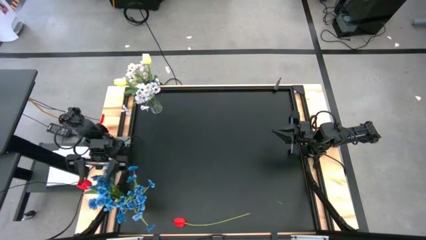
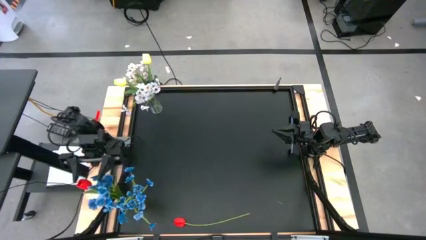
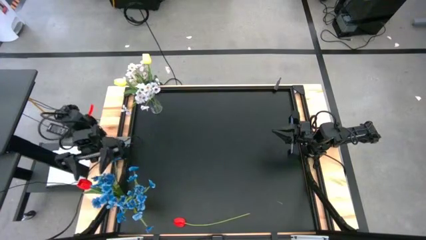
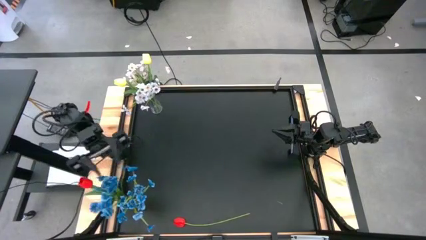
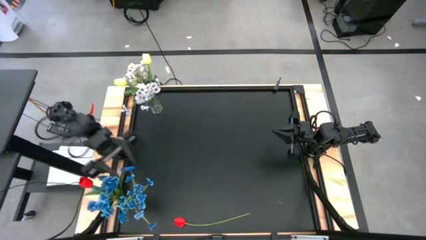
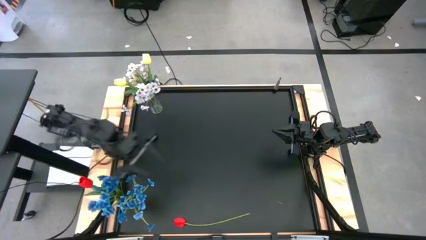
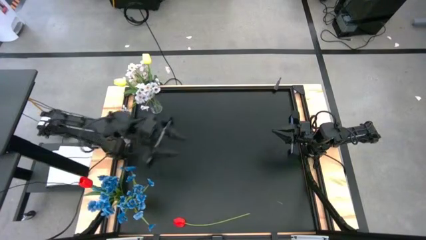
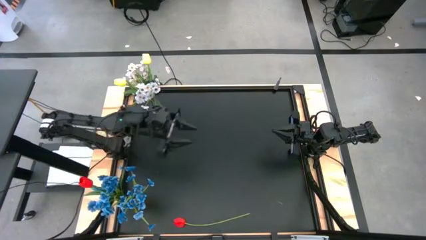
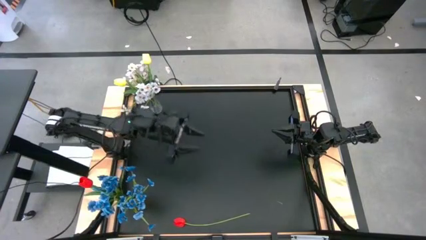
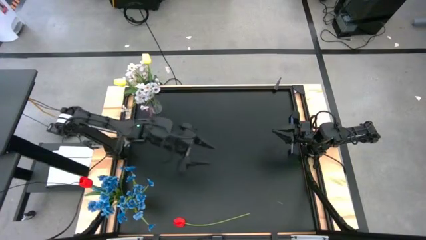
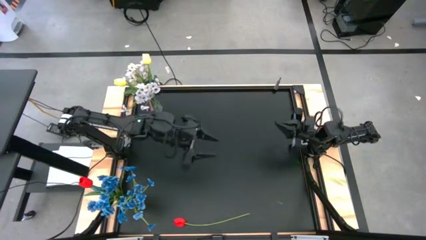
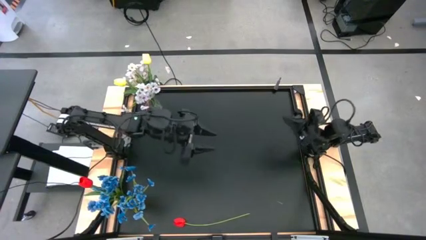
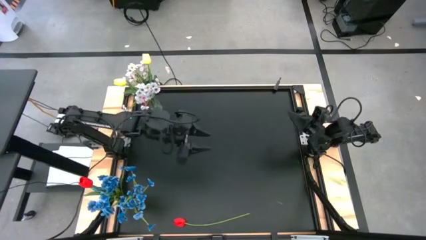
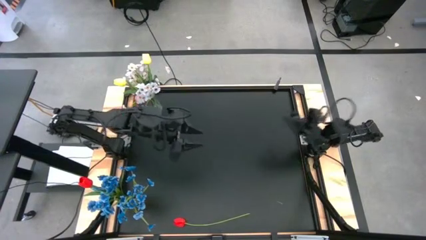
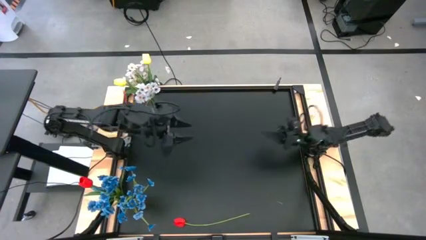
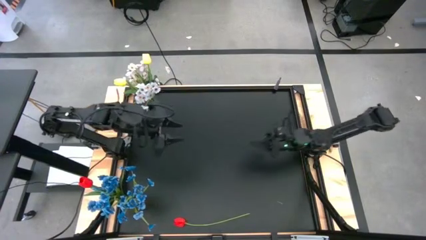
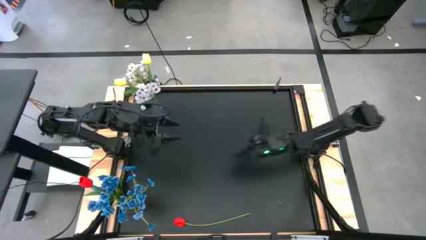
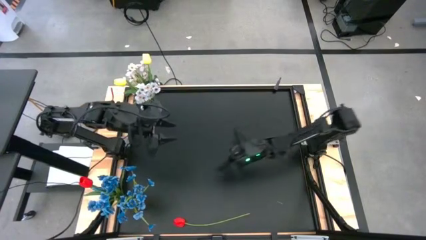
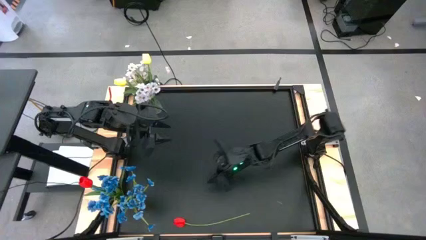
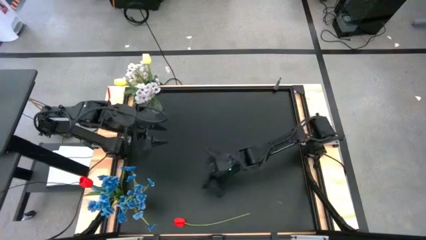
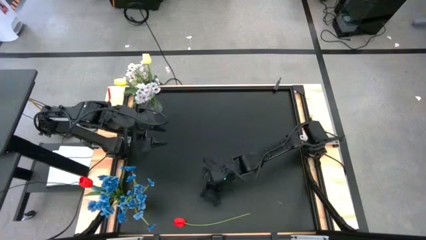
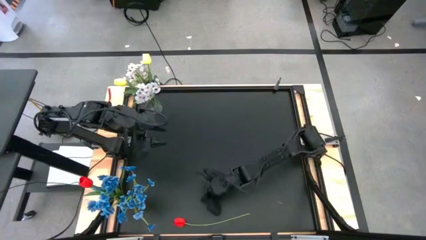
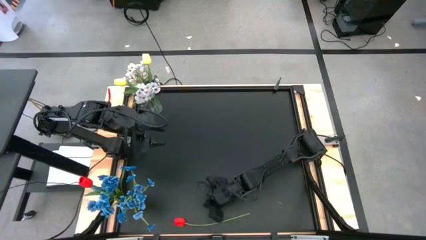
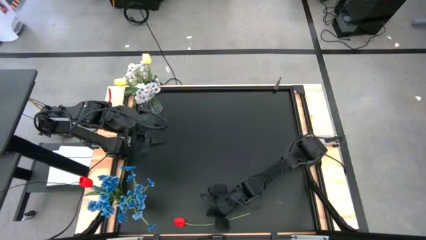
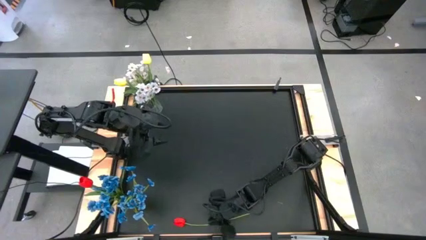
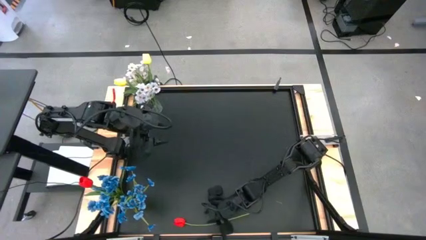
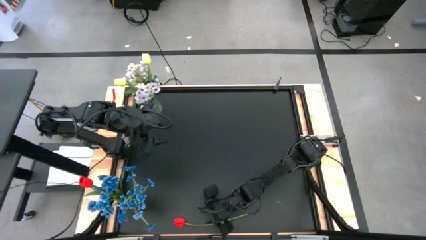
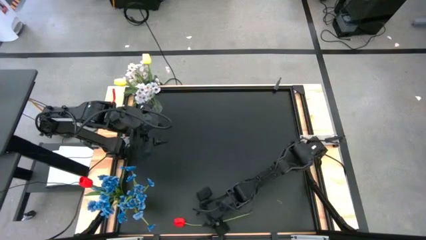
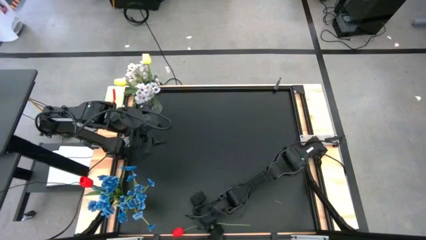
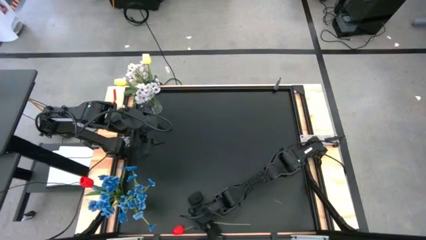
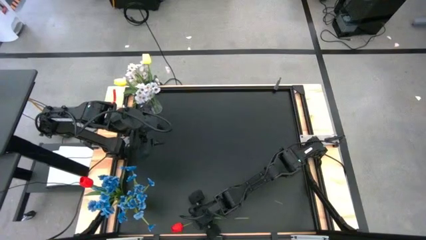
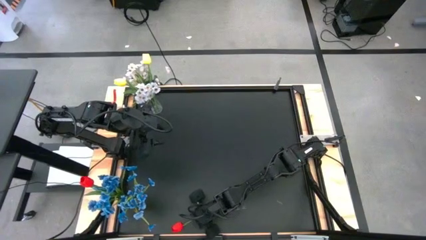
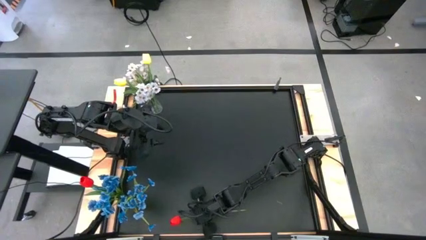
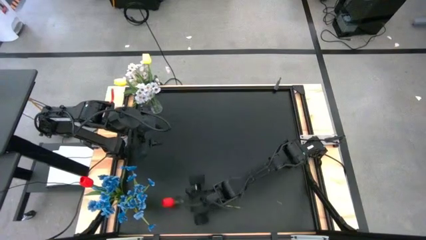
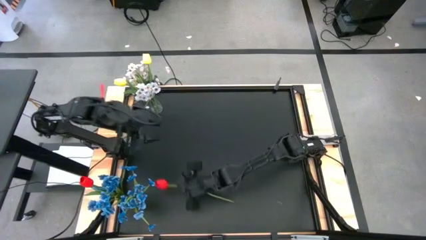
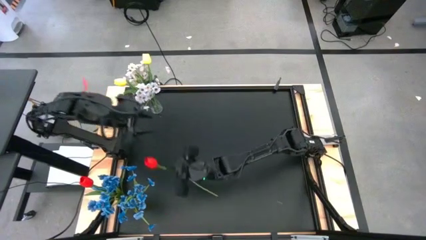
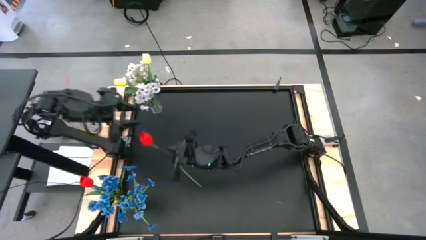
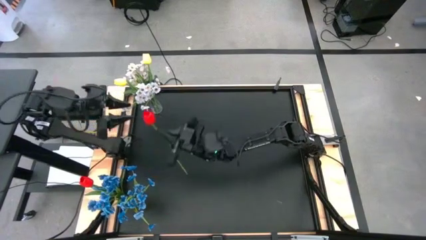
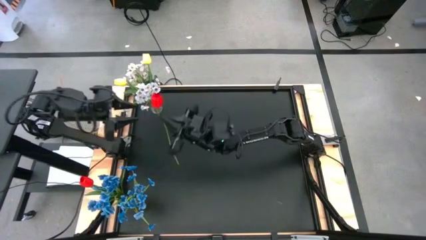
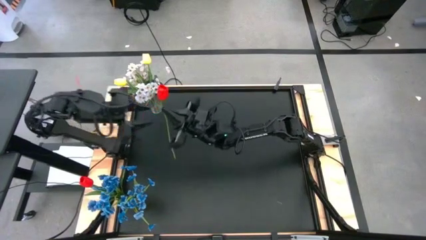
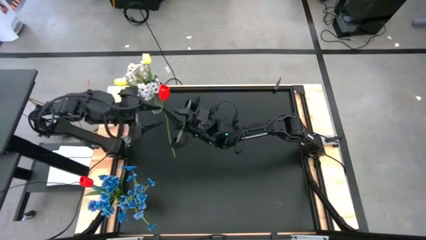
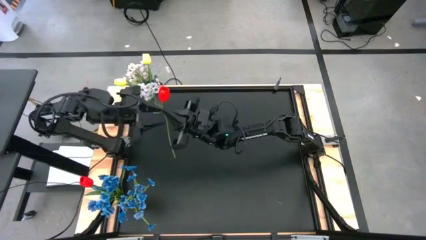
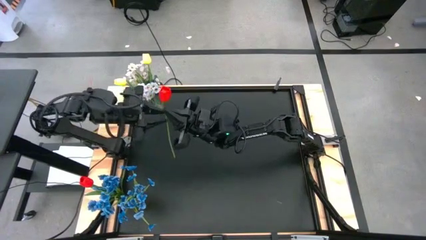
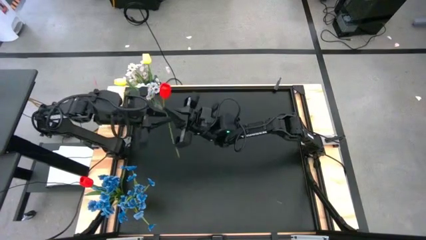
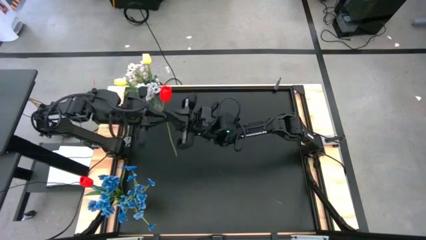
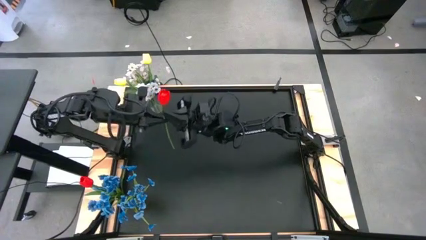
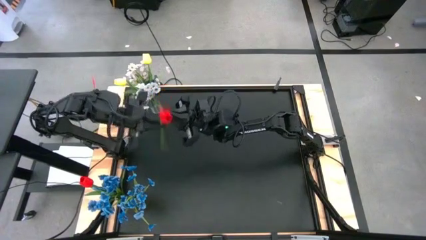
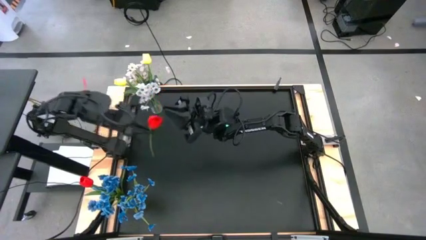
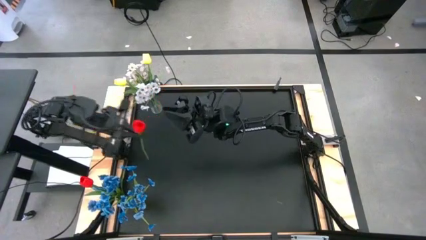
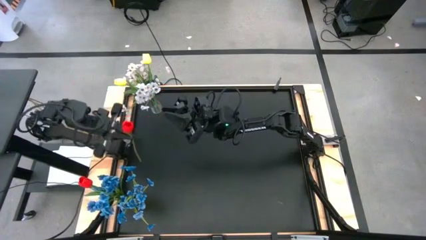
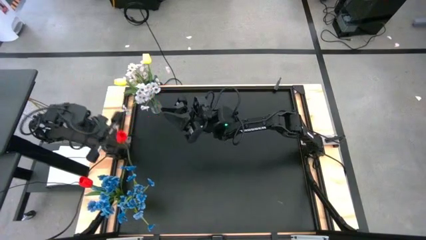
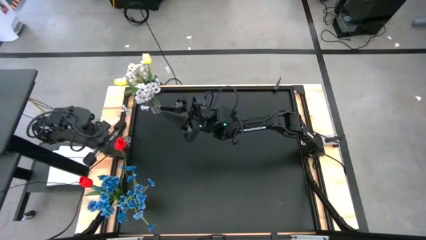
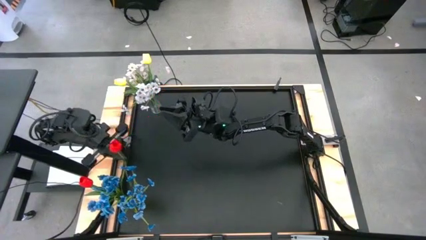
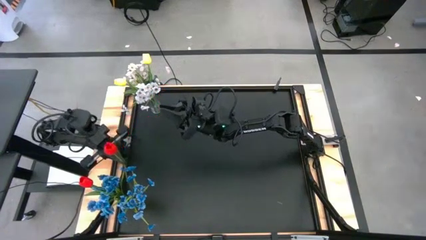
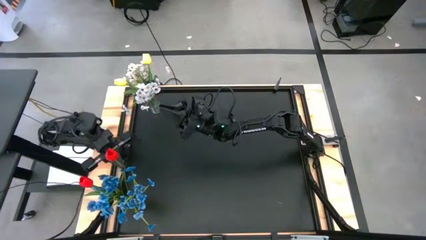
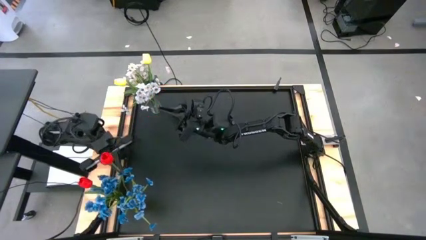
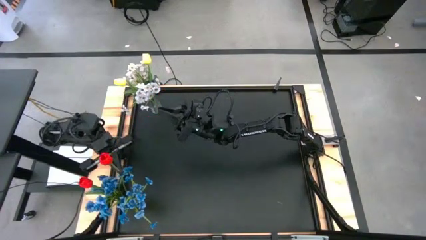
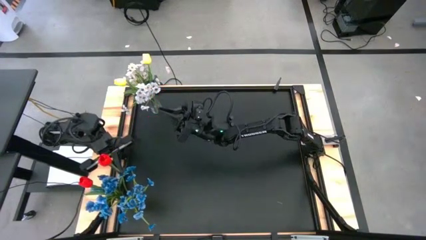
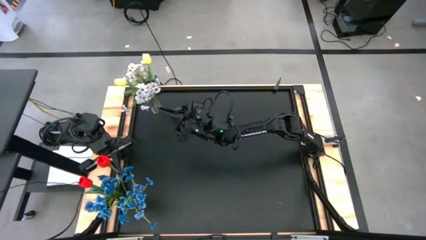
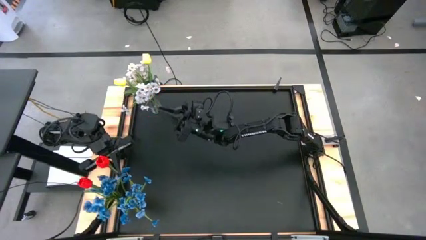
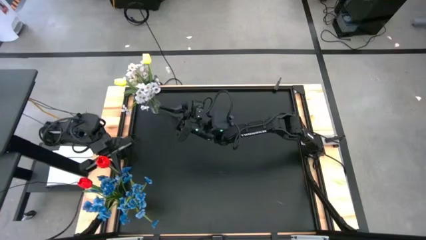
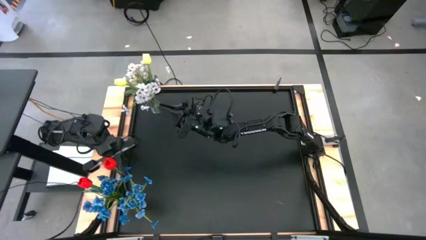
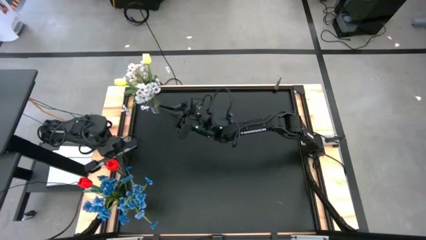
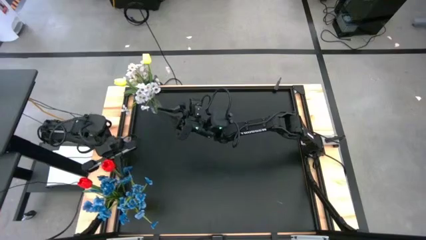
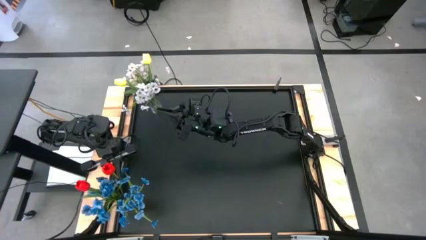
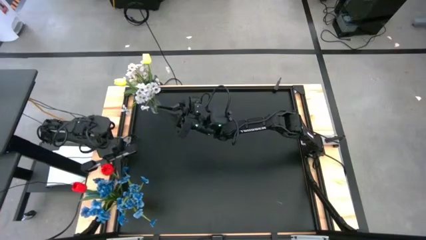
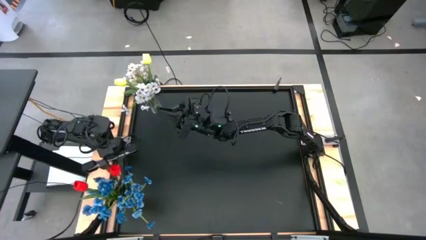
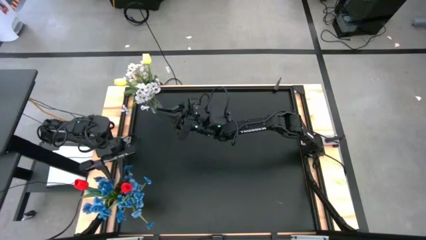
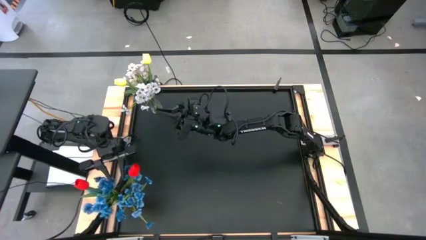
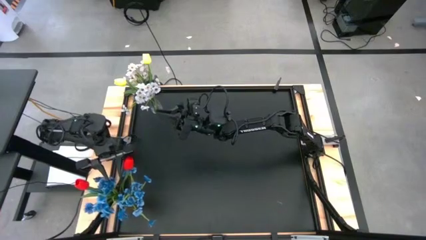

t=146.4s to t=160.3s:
Task: Sort flowers into vase by color
Put the red flower into the yellow vase

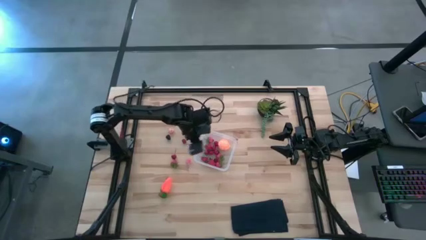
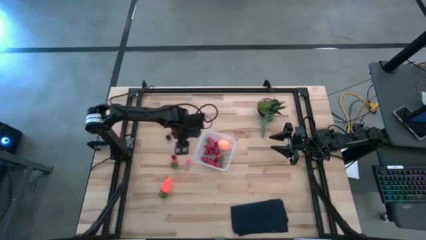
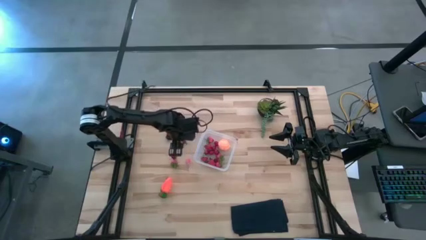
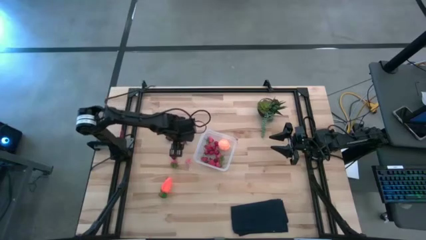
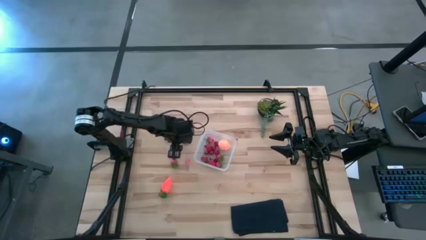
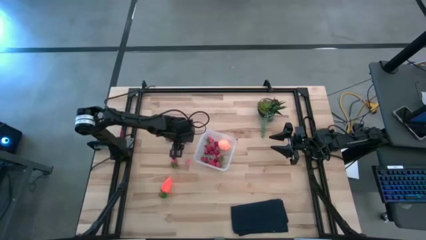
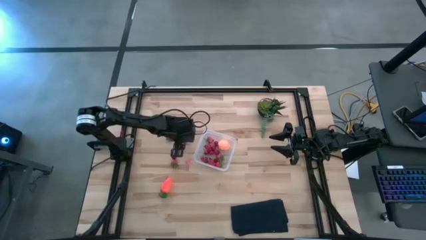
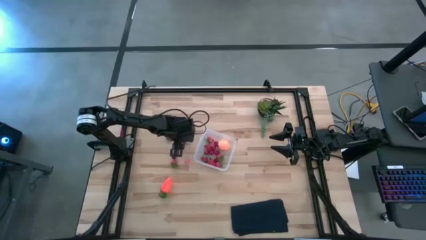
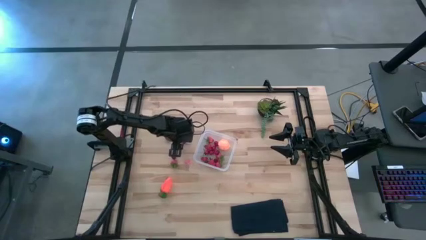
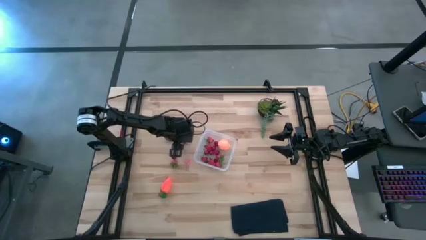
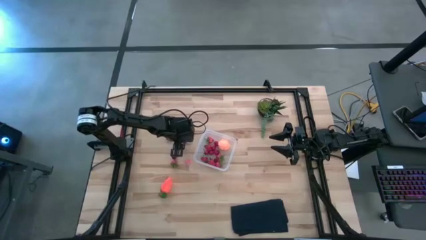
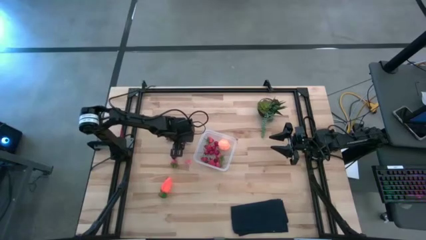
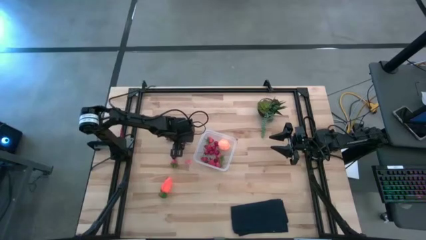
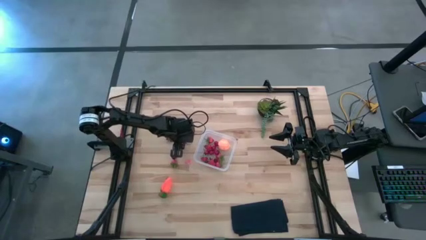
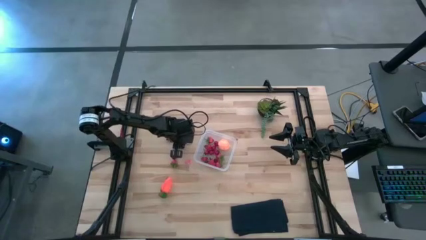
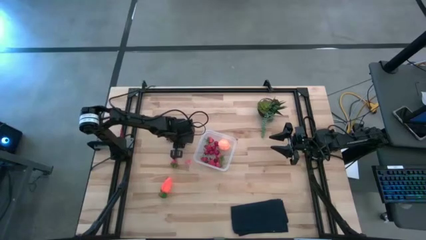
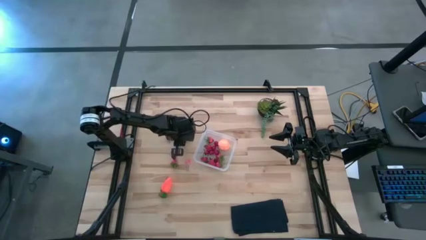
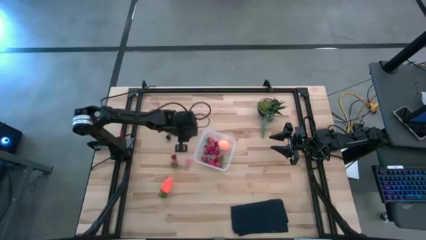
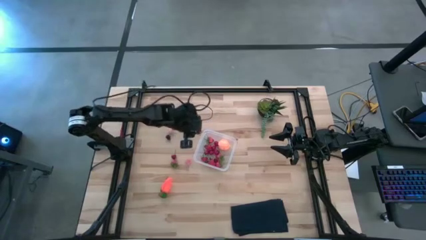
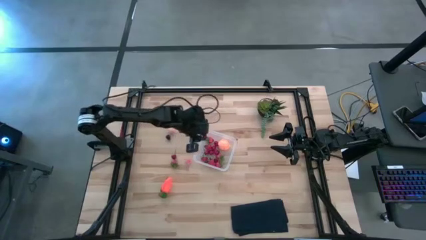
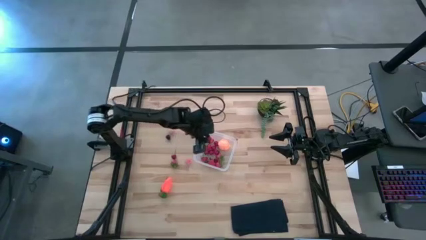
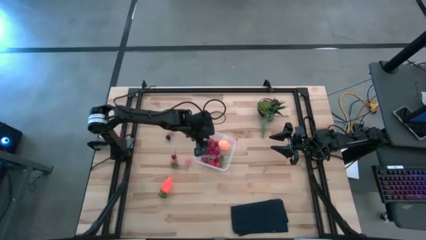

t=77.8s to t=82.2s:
Task: Pick and placing Produce into tupperware
Put the red cherry into the transparent bin
